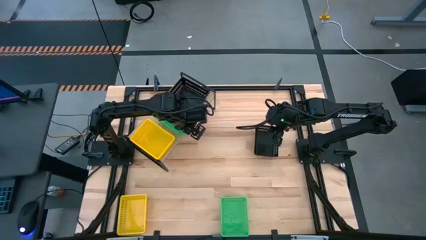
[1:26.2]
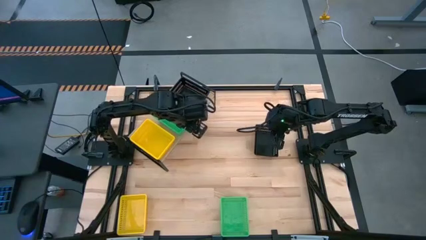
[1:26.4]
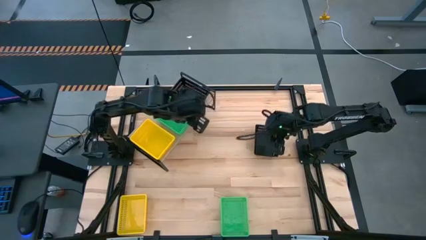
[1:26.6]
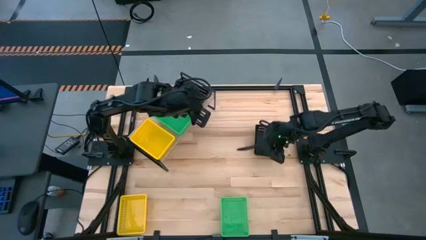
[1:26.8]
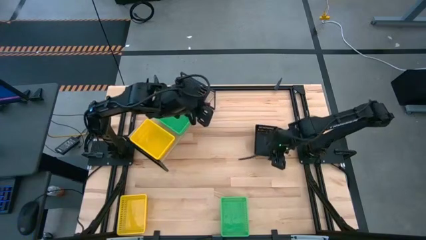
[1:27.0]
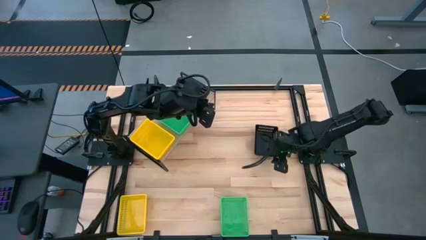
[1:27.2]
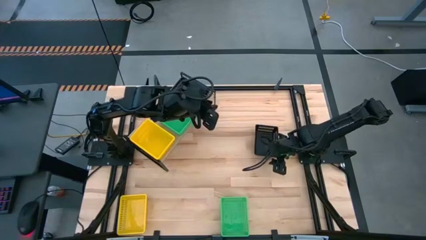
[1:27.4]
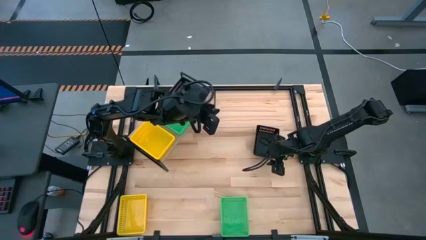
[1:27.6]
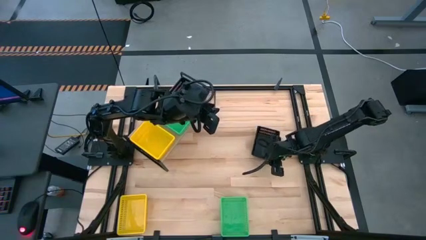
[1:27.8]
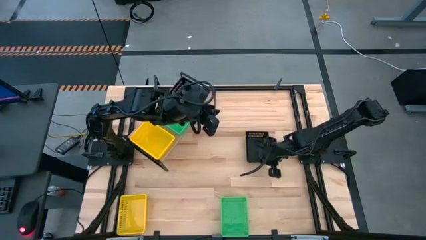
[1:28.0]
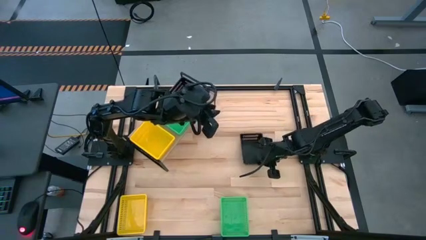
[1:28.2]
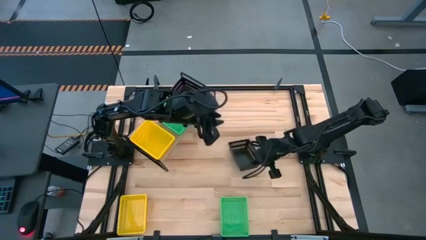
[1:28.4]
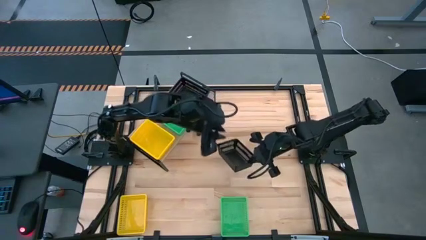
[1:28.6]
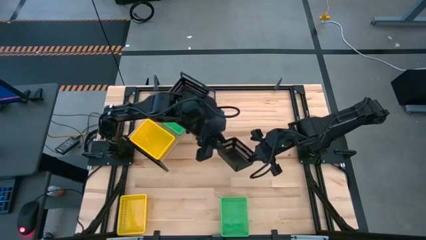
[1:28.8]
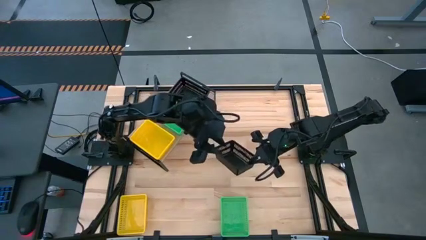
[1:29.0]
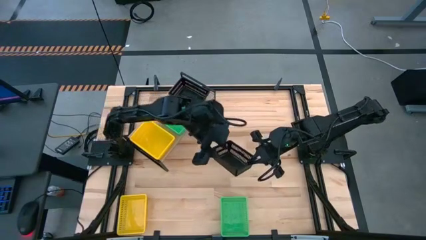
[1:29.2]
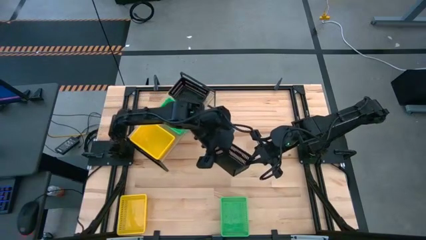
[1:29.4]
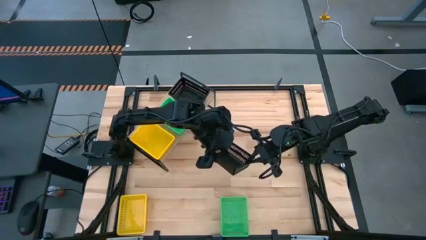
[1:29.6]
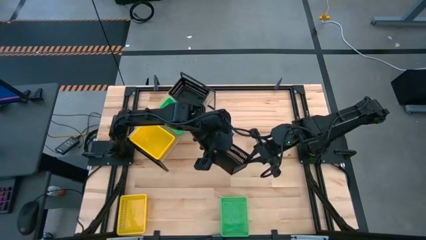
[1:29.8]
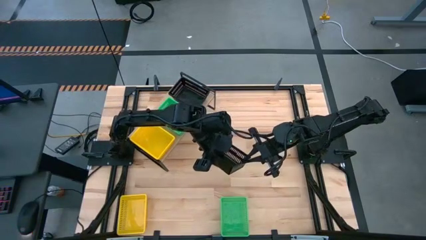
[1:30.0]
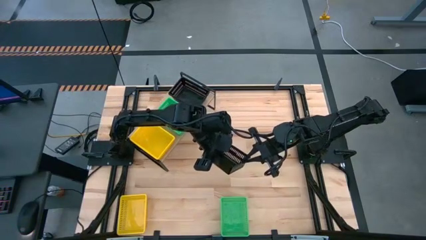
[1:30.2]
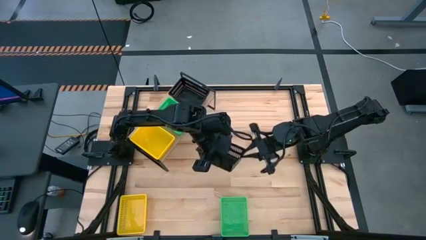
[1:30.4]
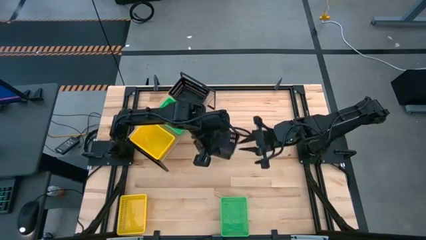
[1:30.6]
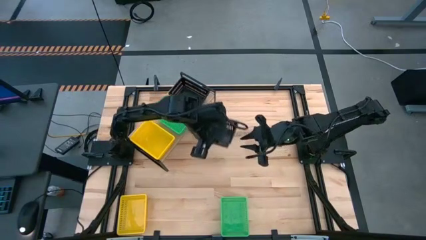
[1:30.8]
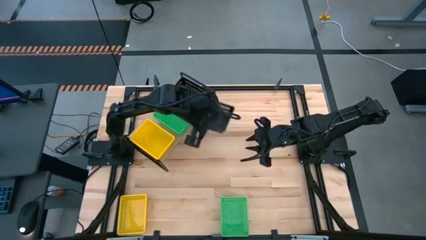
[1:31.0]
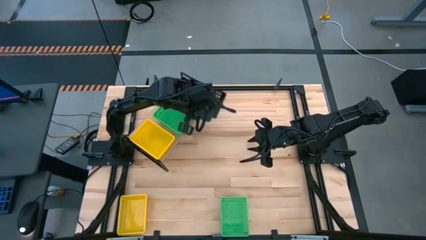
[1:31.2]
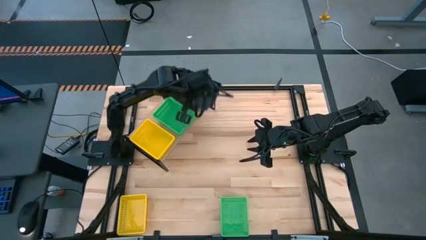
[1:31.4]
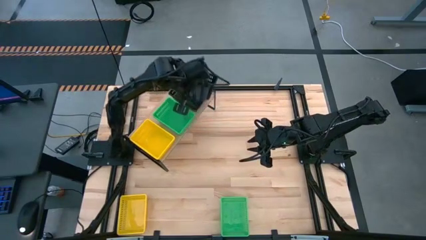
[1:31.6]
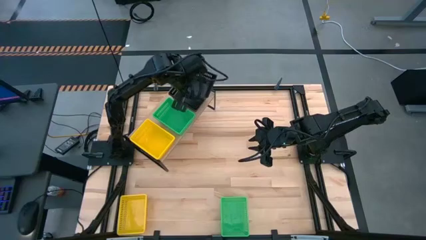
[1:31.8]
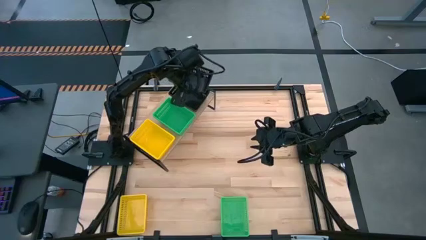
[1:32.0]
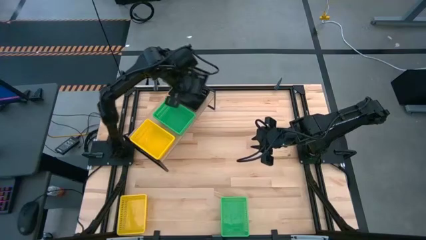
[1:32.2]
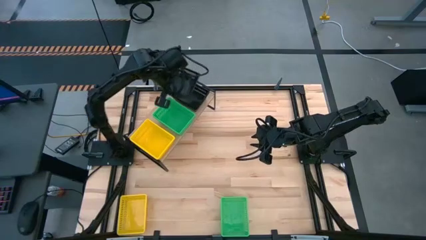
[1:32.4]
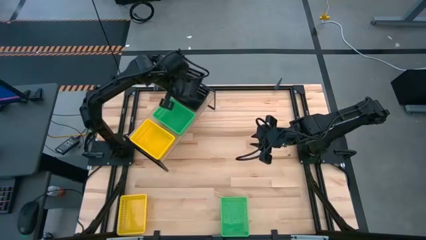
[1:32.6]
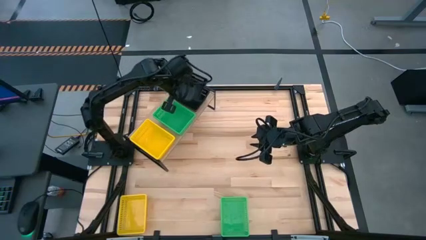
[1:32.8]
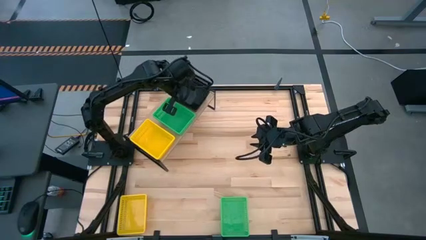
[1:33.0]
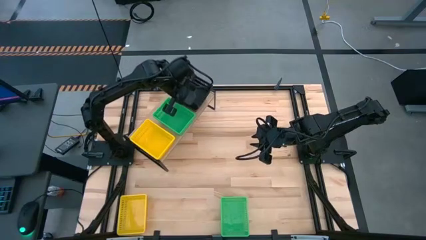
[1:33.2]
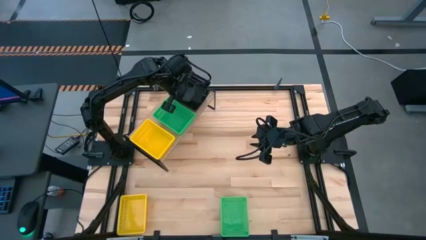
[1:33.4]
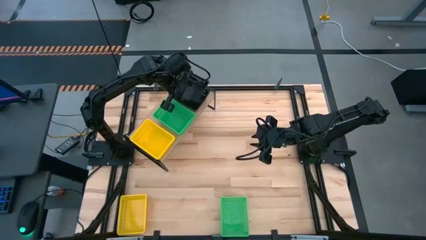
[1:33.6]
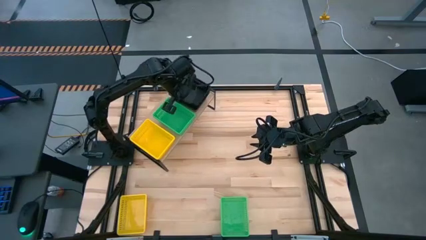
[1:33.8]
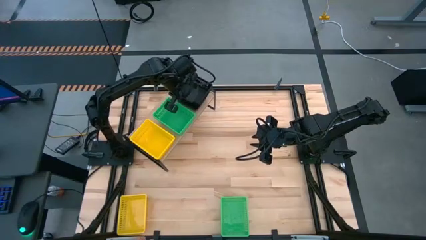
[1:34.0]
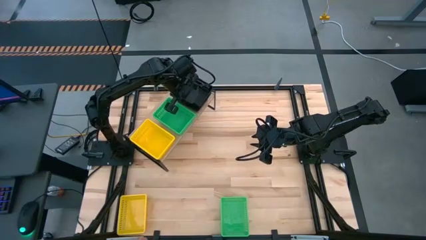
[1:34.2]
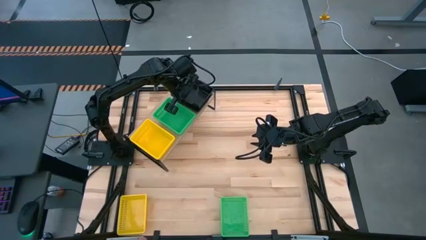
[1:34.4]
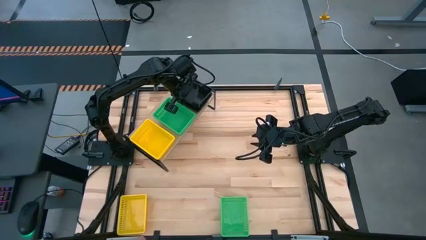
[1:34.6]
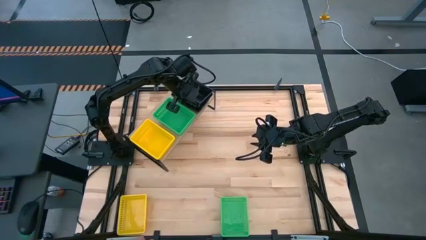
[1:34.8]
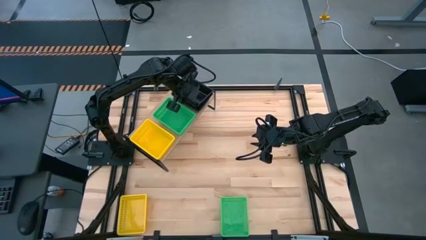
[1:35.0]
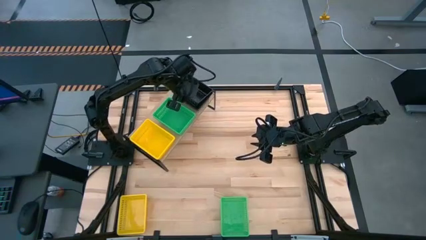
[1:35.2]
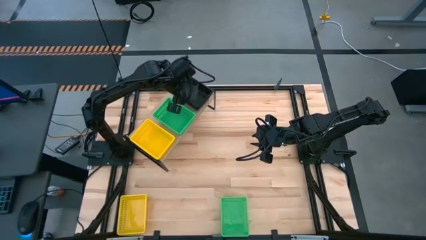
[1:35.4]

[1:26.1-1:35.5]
Task: Stack baskets on shelf by color
Stack the black bin on top of the other black bins on the shelf

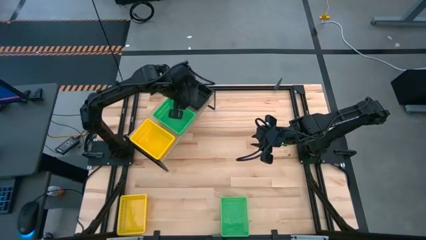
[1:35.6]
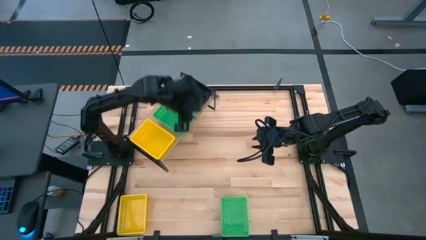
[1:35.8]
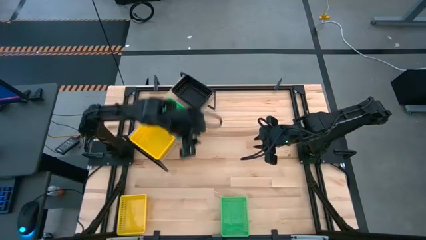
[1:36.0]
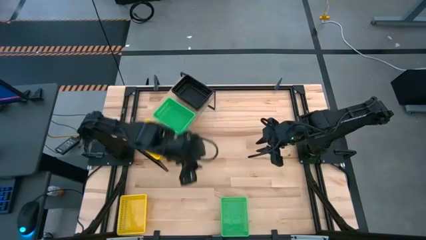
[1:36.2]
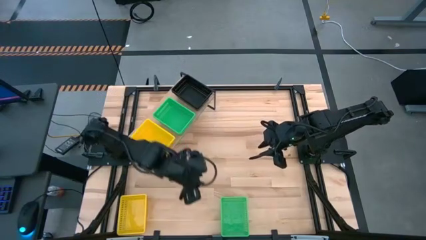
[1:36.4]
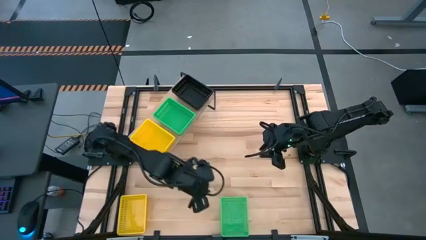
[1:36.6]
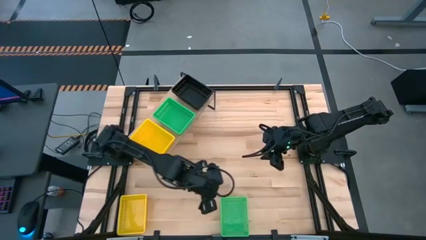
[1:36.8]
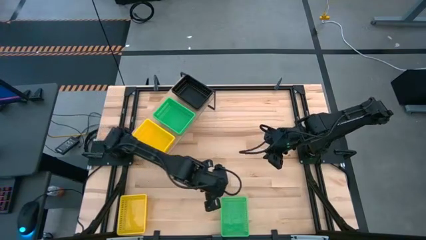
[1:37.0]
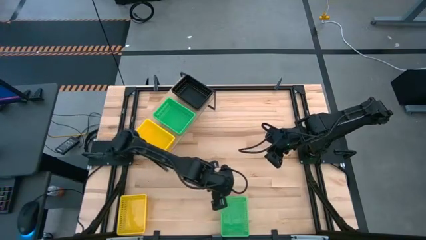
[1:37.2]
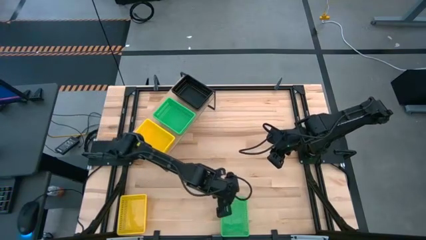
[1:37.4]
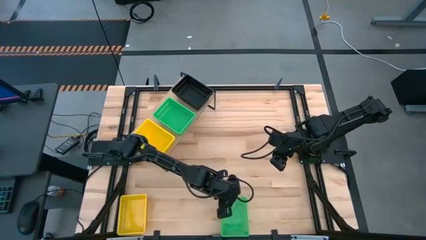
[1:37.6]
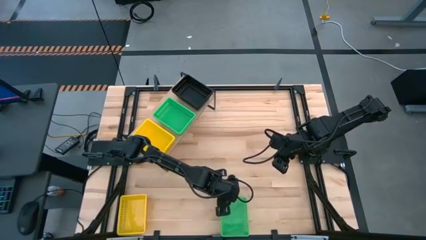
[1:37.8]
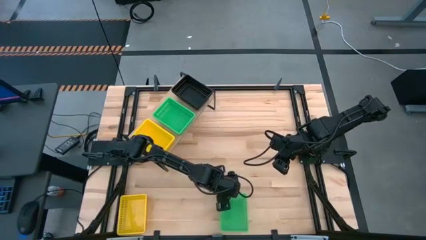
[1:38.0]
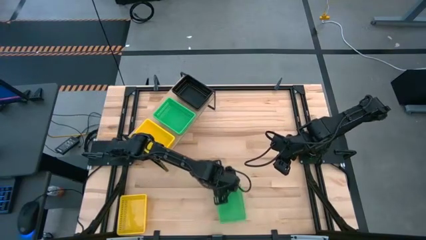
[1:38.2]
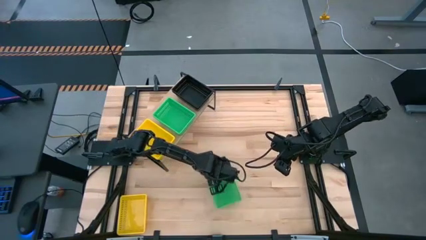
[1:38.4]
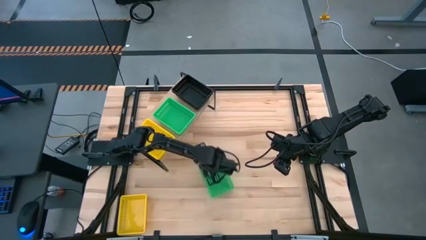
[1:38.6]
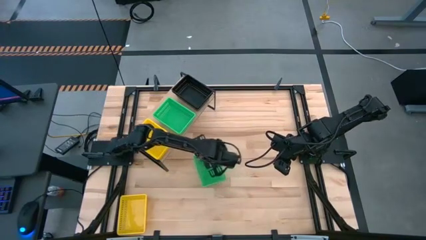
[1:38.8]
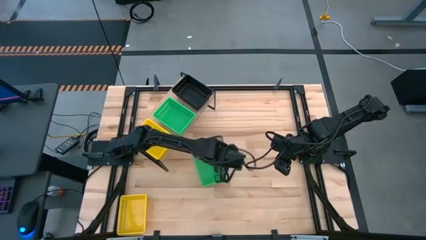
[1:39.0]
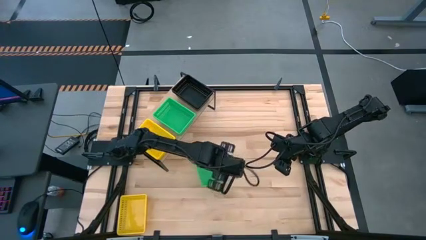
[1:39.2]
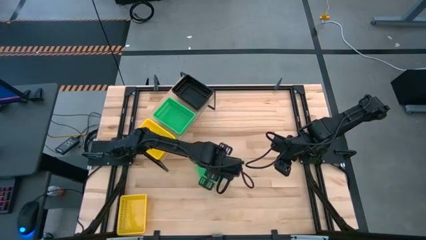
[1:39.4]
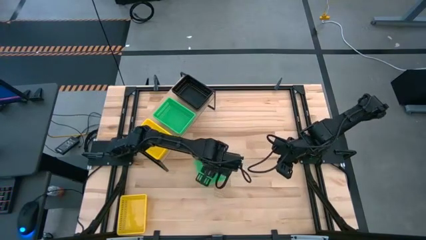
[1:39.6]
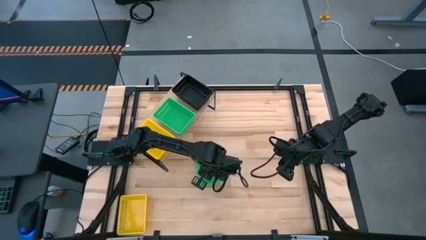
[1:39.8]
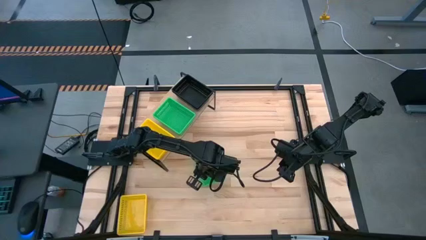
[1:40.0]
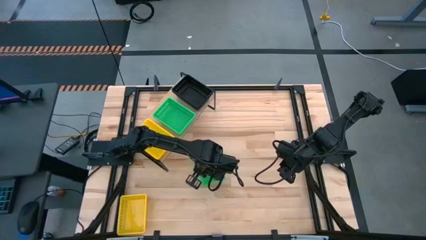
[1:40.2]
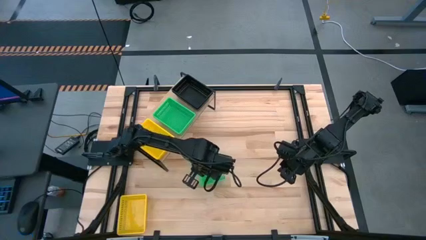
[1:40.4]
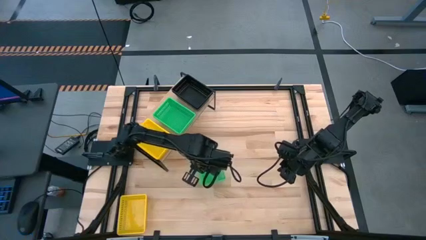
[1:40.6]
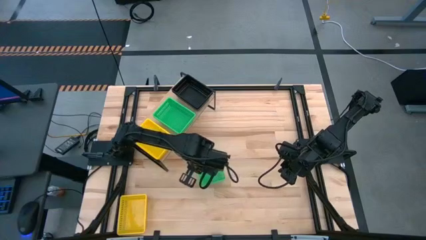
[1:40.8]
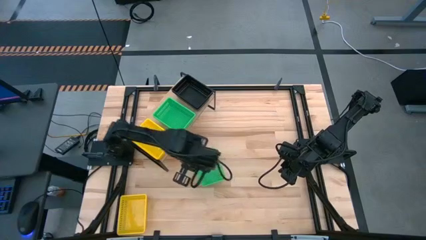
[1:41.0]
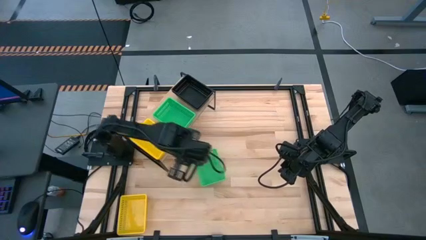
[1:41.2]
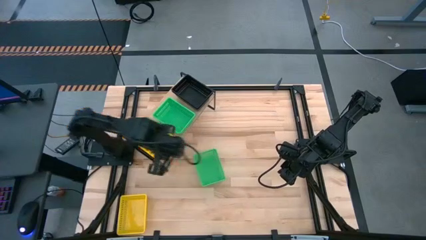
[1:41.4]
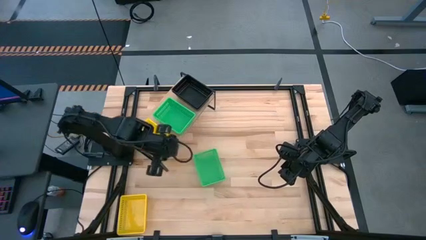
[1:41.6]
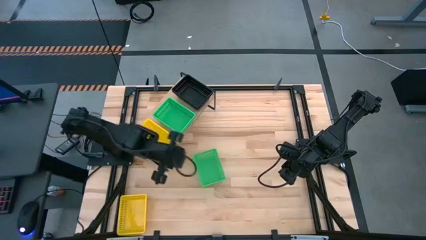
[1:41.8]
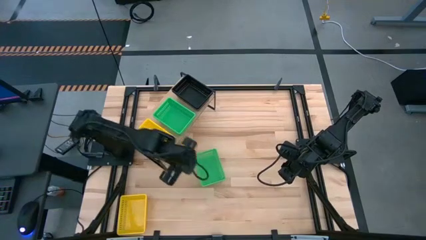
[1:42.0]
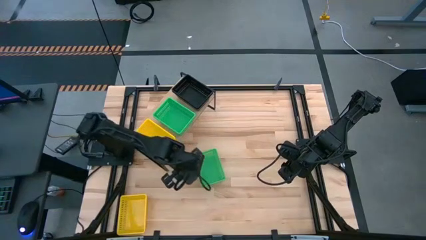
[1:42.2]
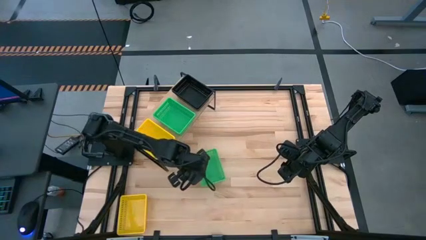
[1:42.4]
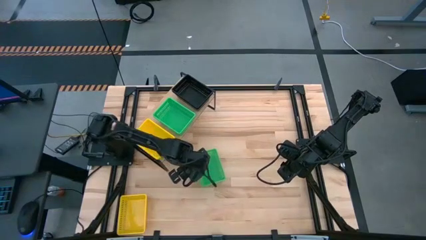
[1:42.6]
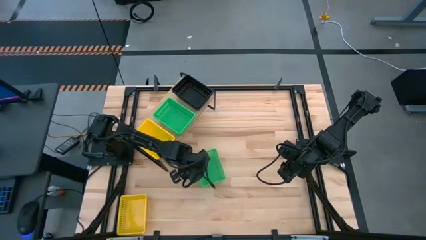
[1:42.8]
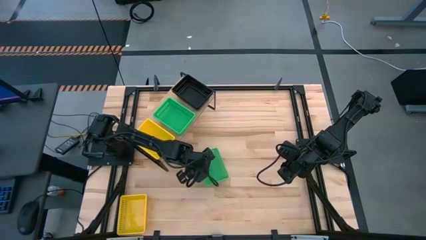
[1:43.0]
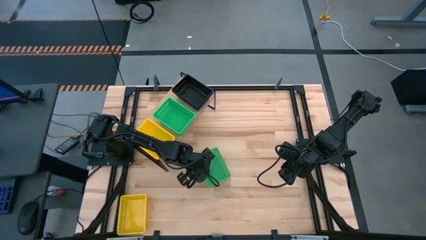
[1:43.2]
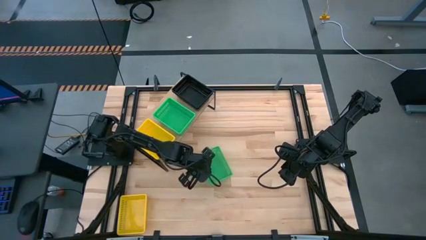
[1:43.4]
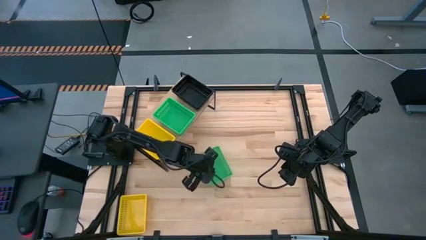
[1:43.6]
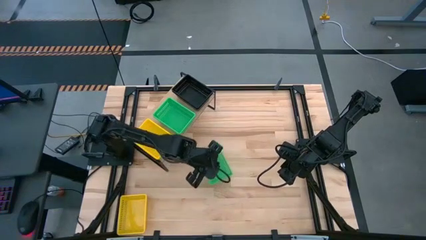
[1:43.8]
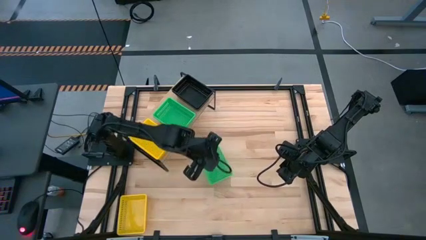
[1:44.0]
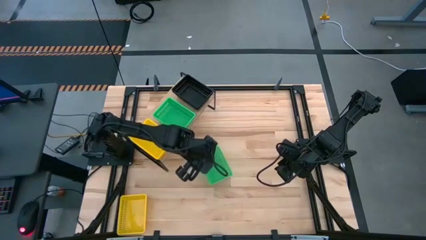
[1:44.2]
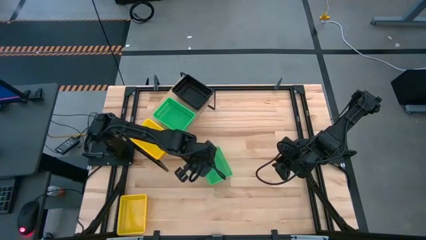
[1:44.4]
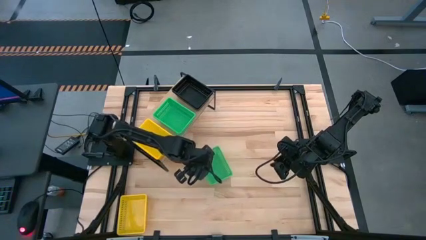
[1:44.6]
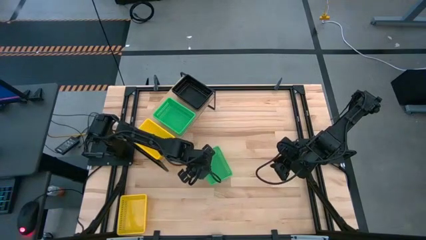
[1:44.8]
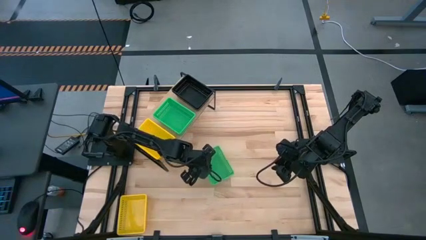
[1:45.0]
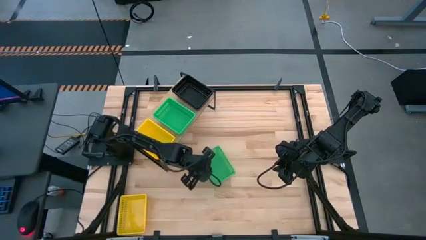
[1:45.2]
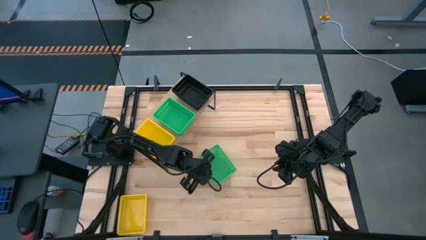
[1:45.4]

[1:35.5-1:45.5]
Stack the green bin on top of the other green bins on the shelf
